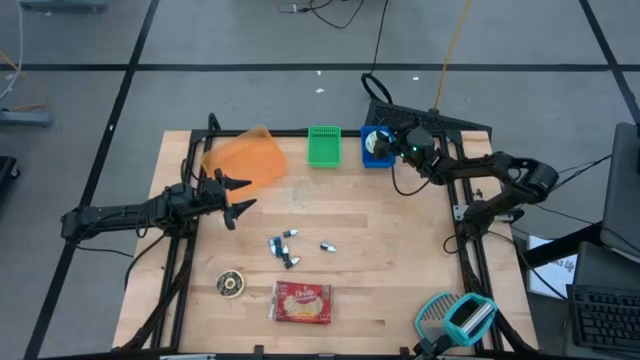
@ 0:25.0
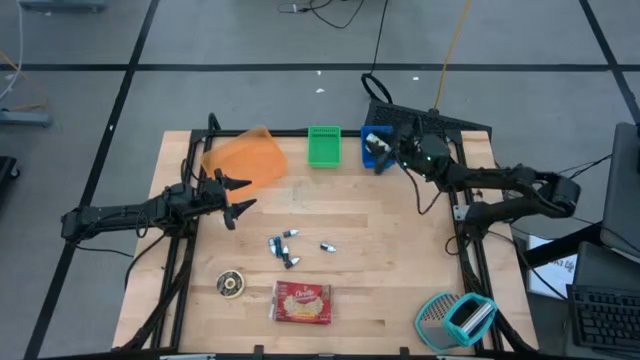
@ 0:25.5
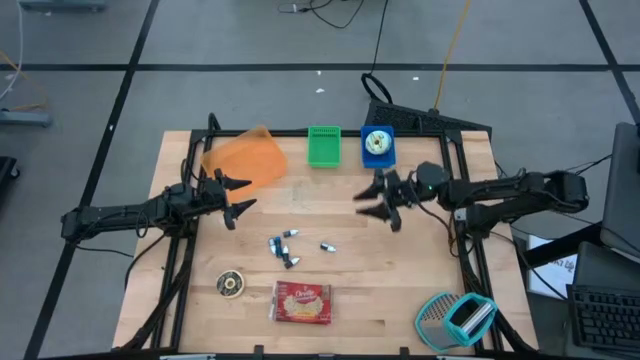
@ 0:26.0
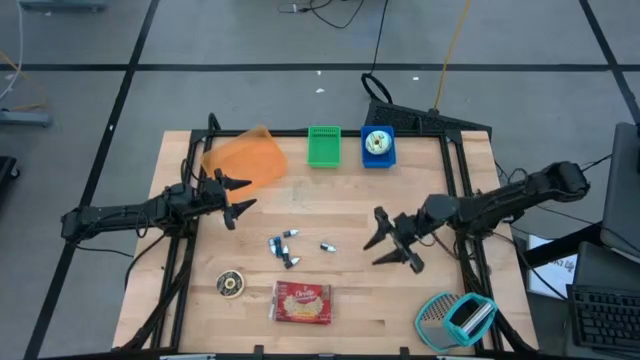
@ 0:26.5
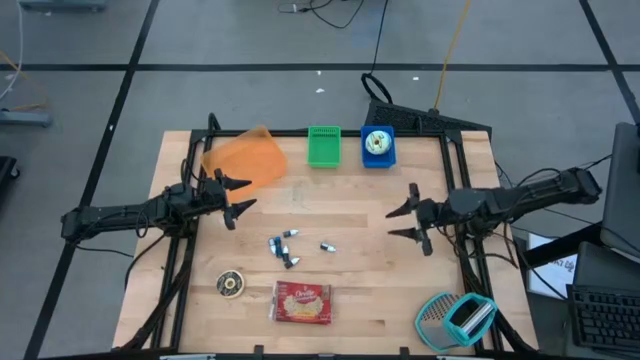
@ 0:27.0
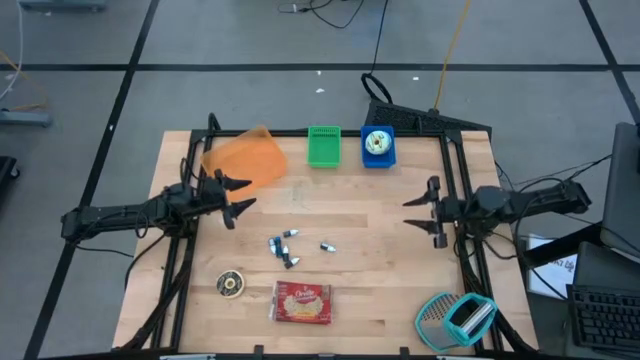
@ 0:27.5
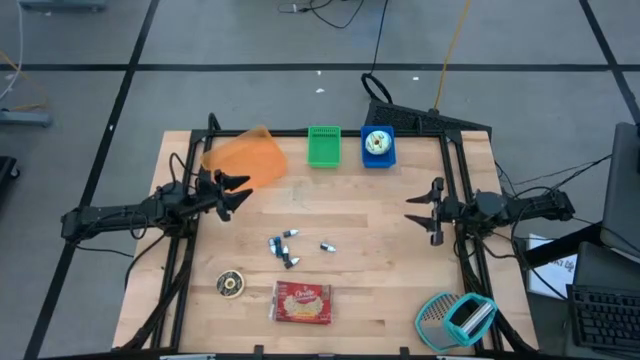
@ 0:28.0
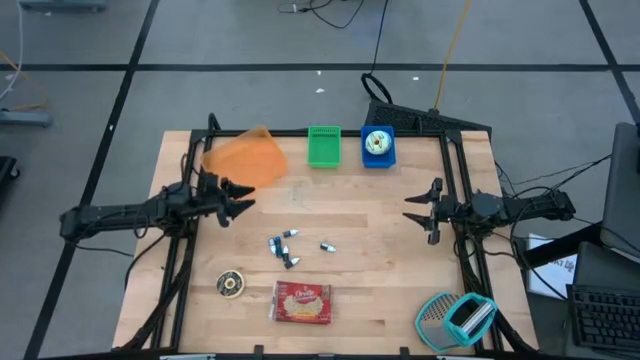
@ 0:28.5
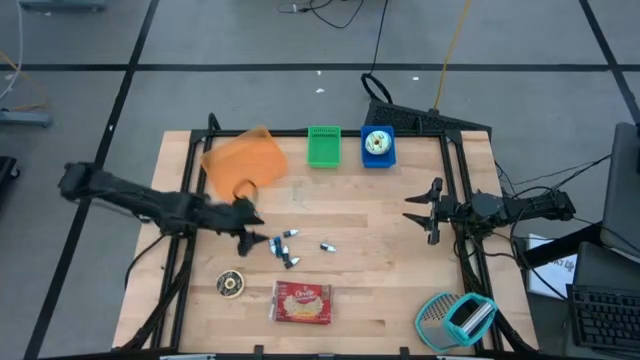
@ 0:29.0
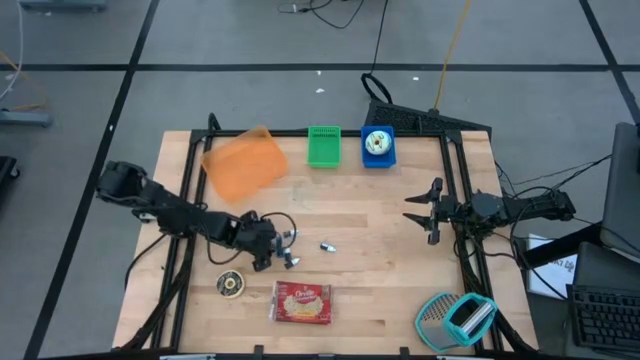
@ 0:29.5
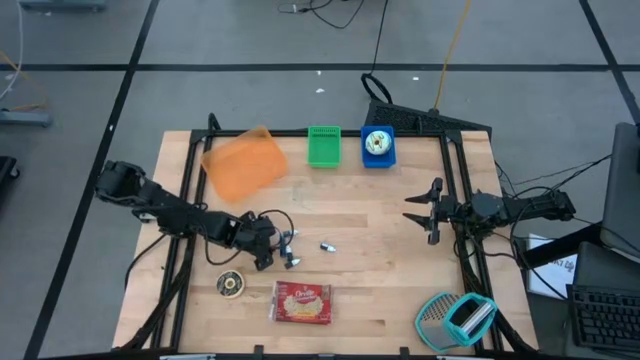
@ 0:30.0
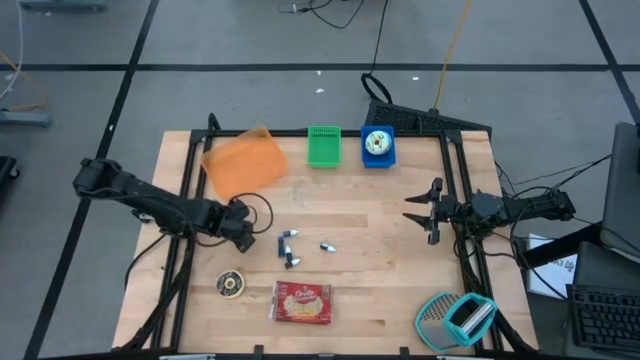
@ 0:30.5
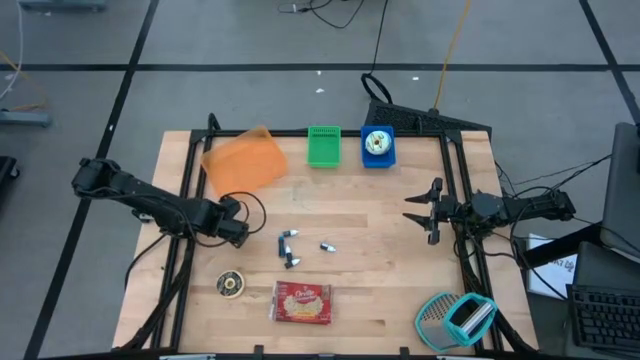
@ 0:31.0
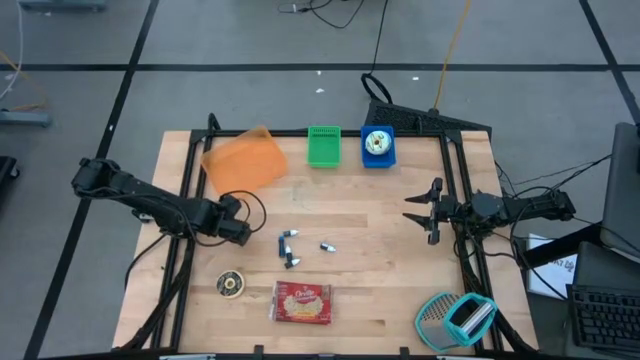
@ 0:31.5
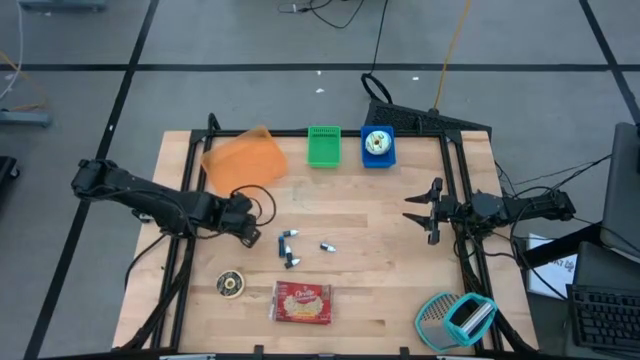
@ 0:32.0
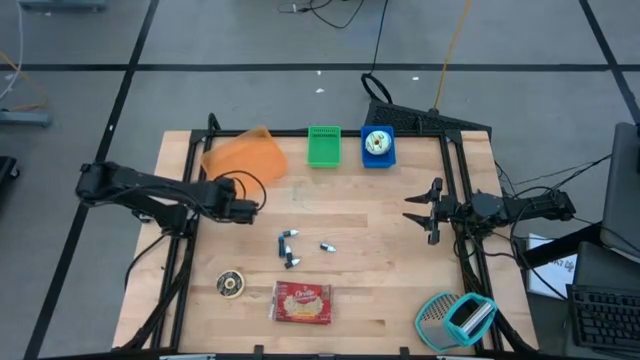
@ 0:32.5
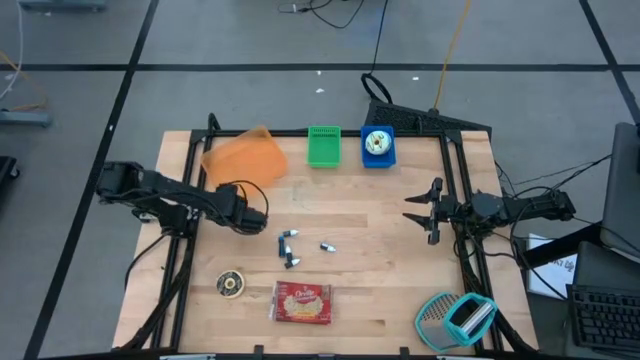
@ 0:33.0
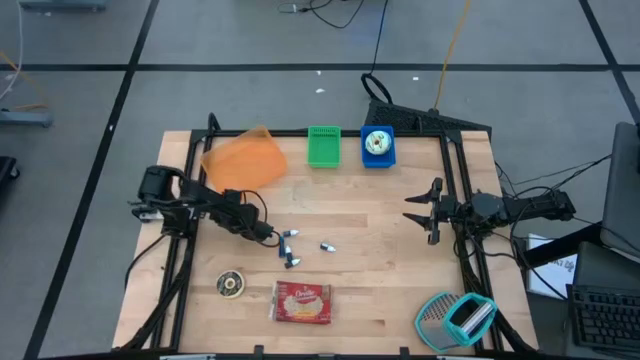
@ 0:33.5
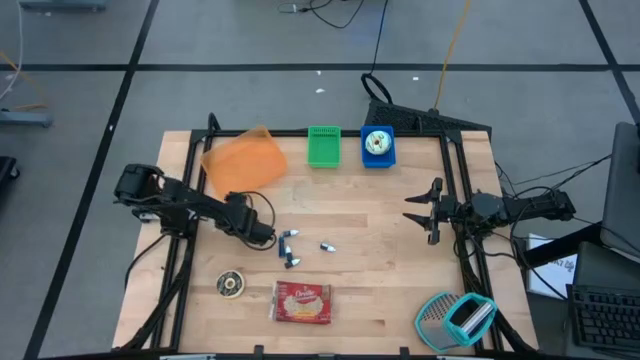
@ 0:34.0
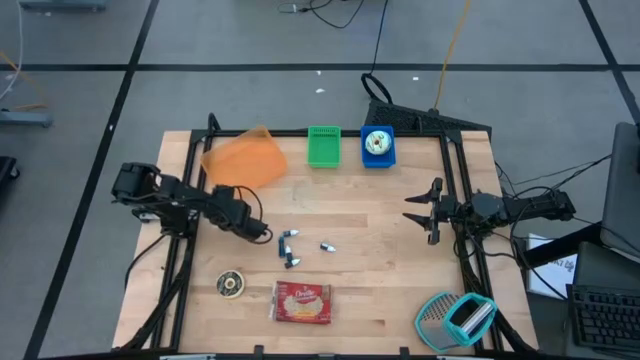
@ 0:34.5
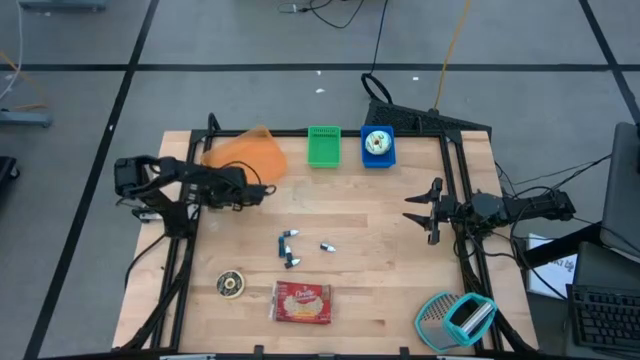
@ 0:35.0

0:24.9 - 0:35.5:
Put the green food coloring bottle into the green bin

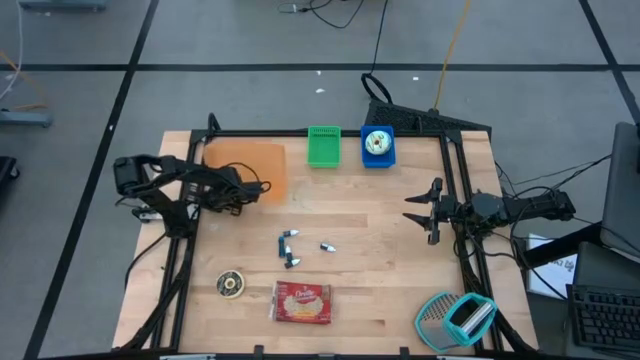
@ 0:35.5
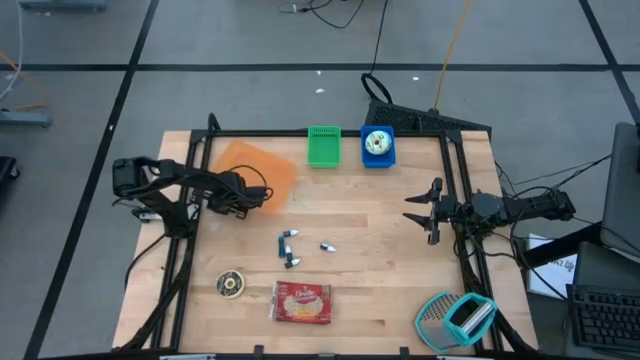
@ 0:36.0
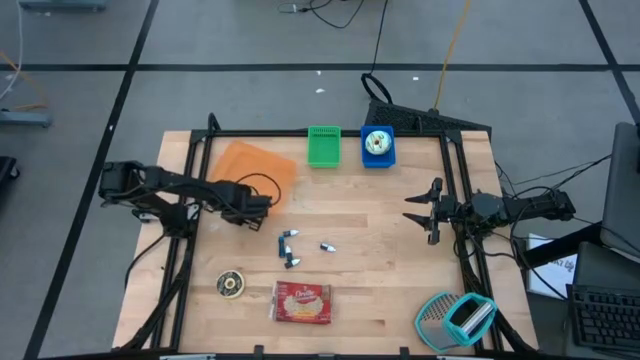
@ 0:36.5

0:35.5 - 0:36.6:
Adjust the green food coloring bottle

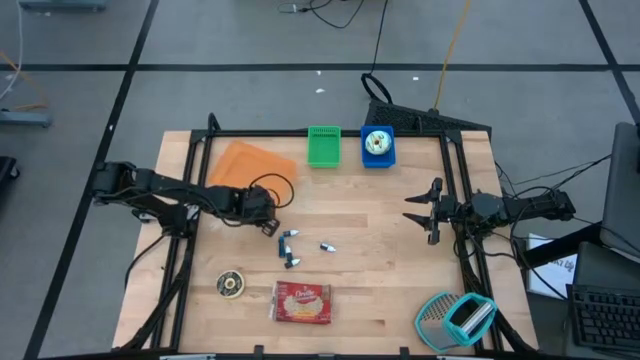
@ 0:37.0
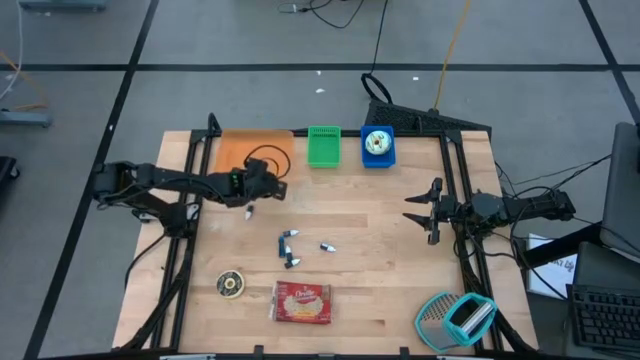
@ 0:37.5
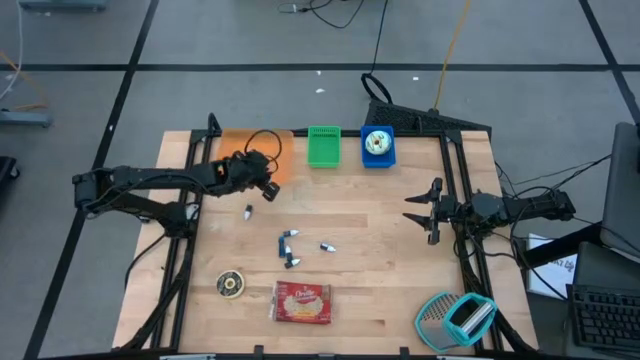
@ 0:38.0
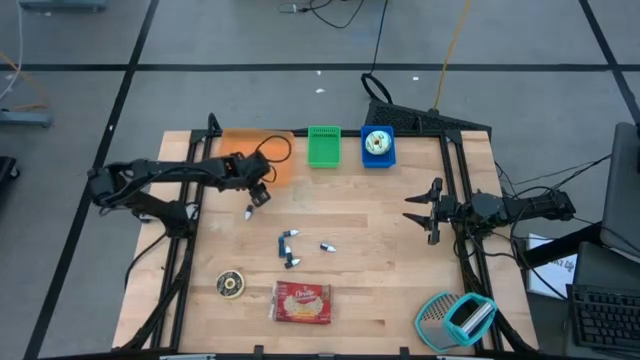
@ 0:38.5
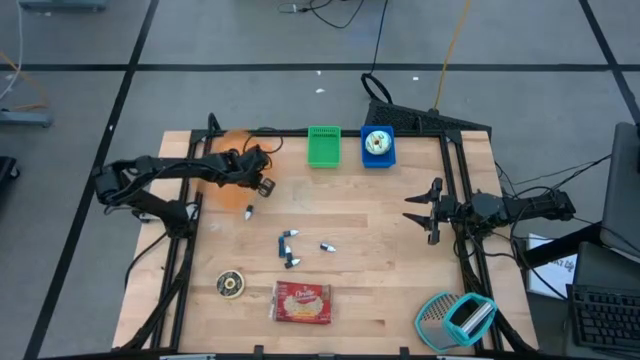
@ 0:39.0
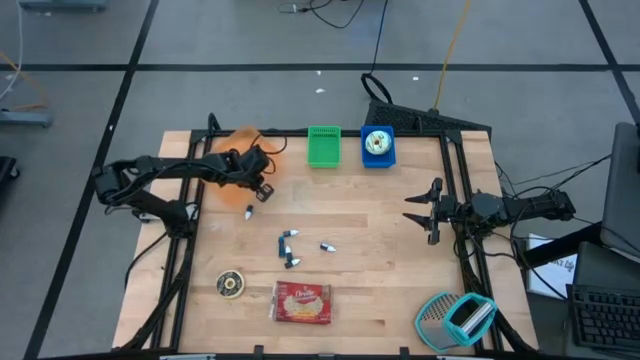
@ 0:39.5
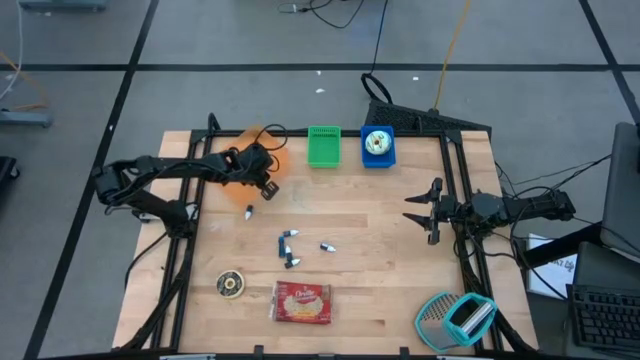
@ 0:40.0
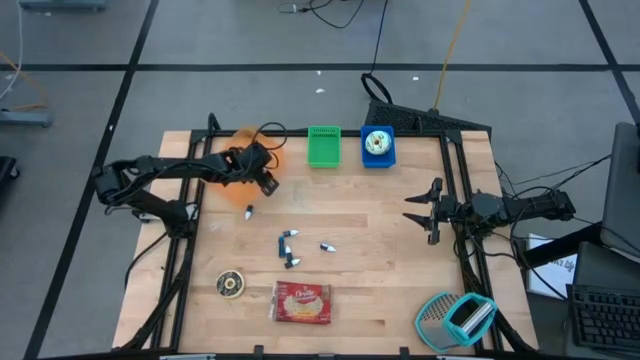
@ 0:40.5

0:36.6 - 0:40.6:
Adjust the orange bin

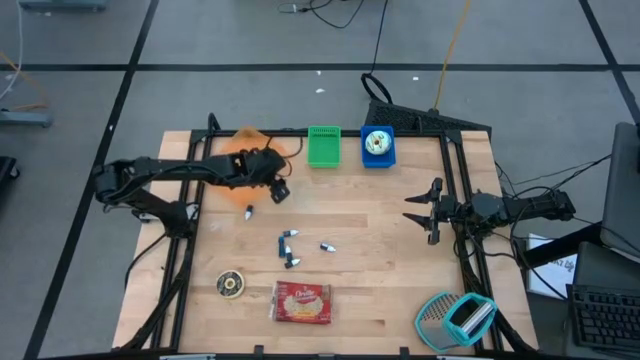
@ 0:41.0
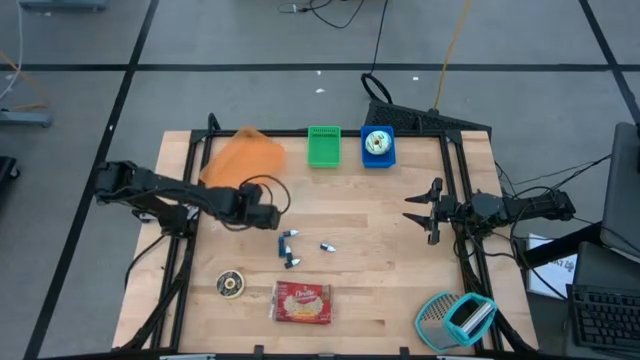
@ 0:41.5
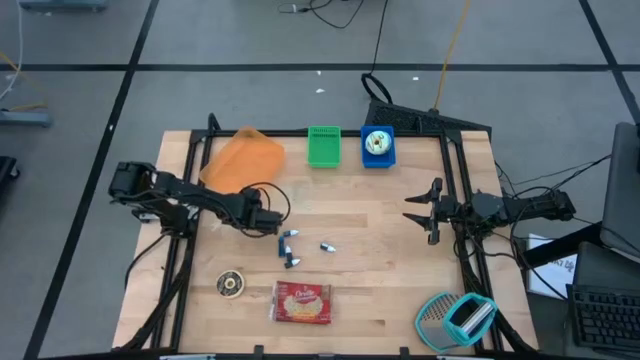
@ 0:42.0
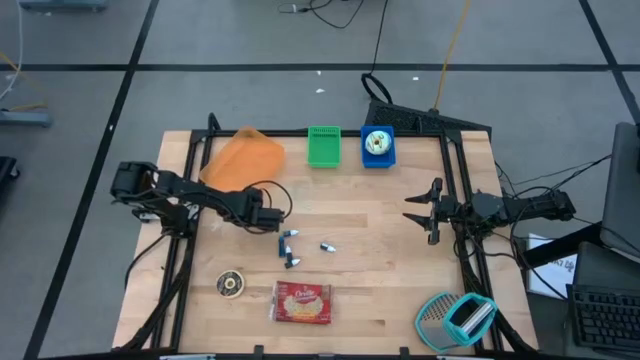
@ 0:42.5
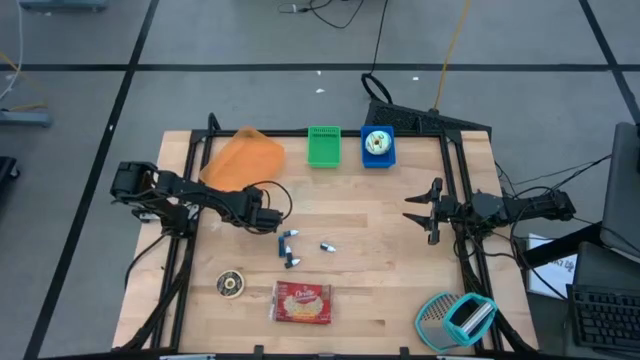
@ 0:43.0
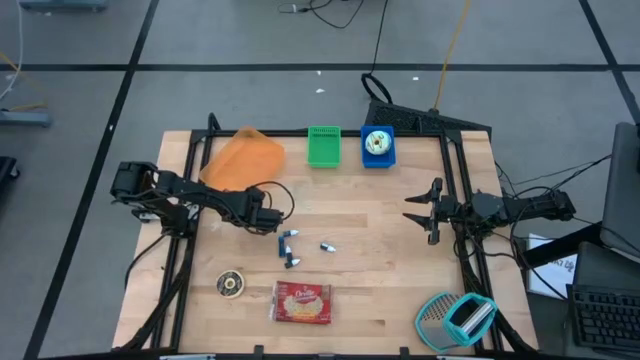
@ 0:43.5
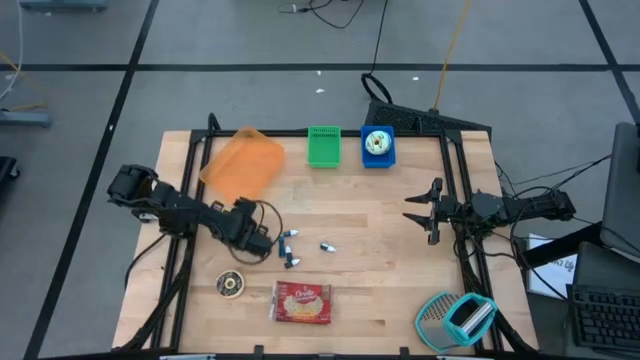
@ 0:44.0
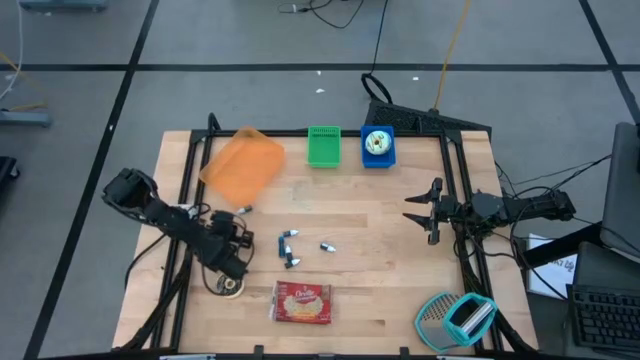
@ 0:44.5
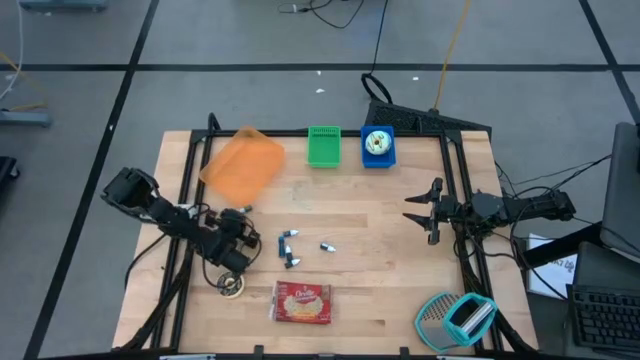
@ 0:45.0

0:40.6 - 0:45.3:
Put the green food coloring bottle into the green bin
